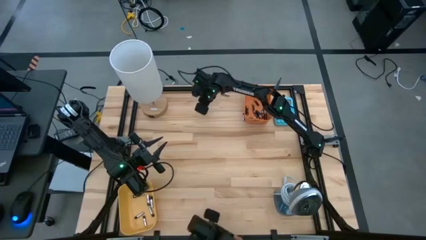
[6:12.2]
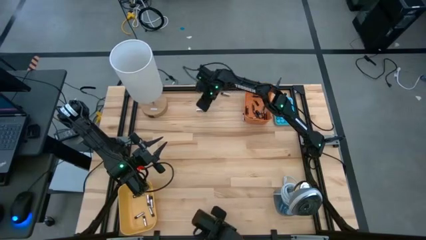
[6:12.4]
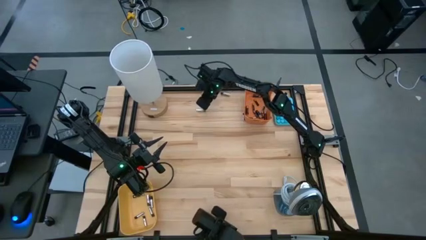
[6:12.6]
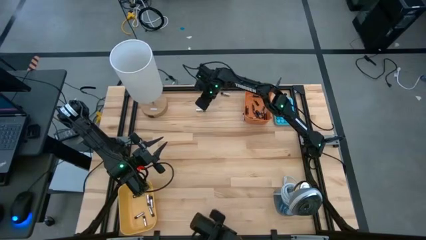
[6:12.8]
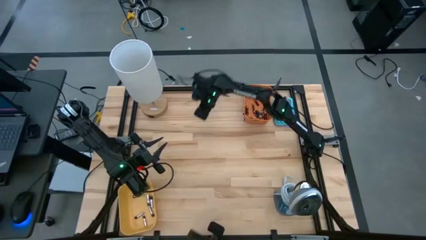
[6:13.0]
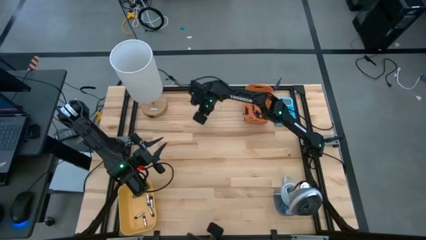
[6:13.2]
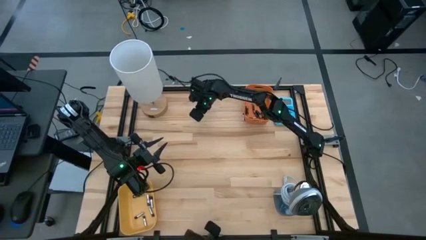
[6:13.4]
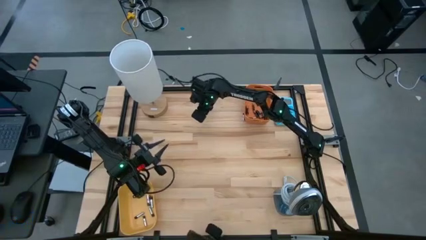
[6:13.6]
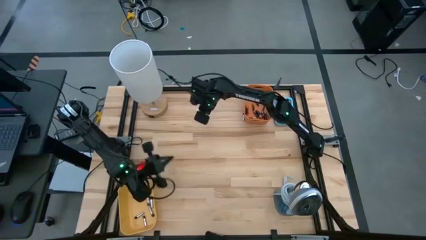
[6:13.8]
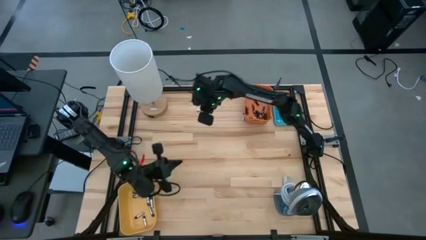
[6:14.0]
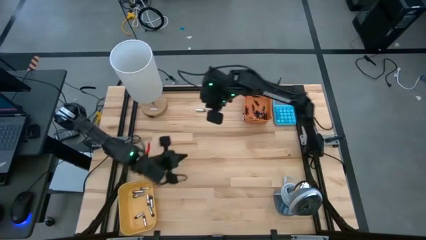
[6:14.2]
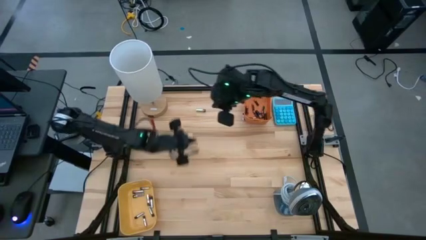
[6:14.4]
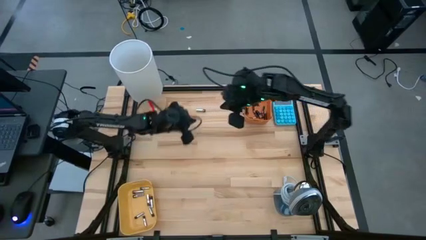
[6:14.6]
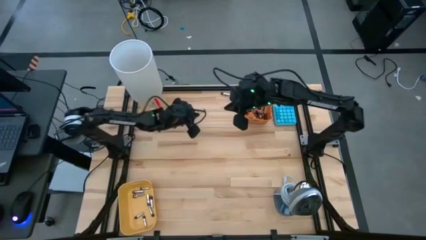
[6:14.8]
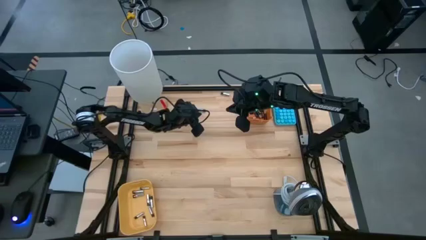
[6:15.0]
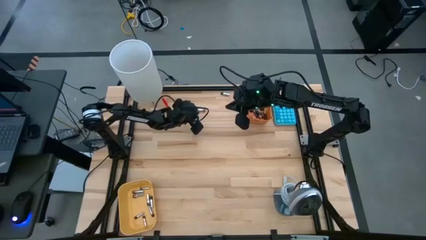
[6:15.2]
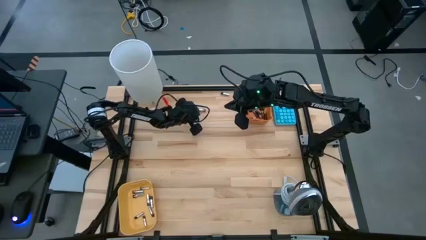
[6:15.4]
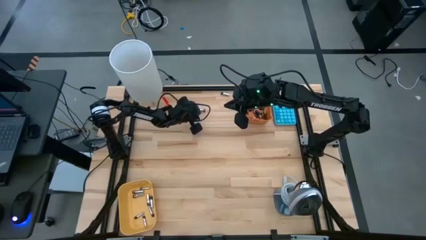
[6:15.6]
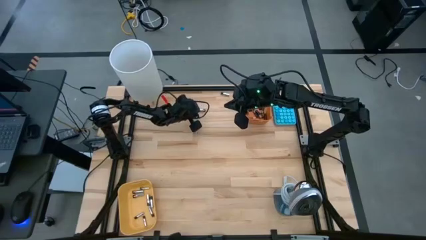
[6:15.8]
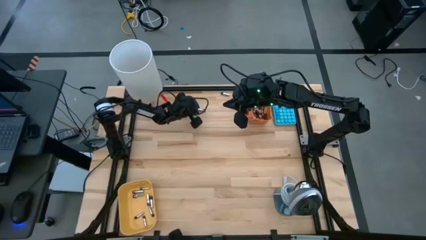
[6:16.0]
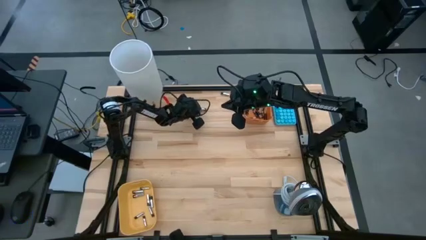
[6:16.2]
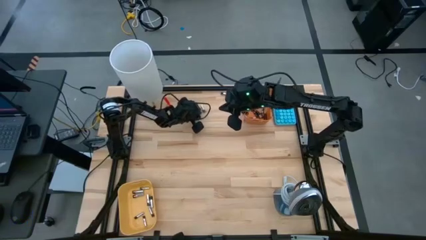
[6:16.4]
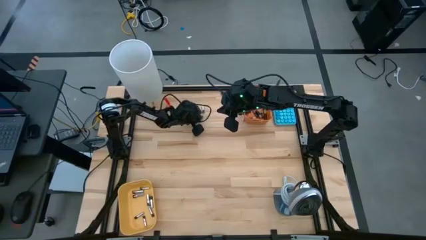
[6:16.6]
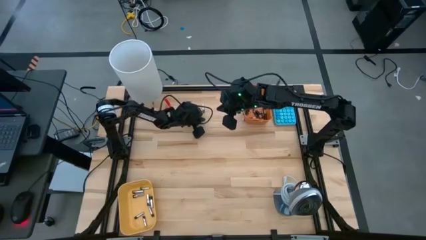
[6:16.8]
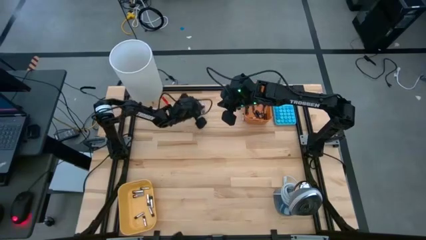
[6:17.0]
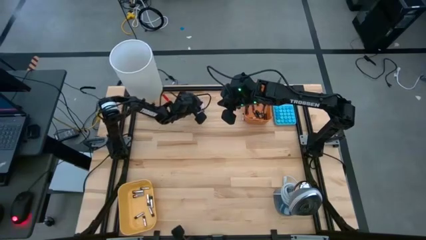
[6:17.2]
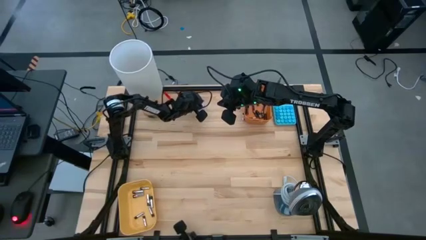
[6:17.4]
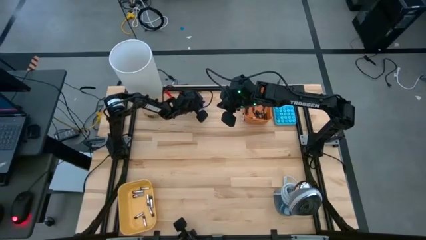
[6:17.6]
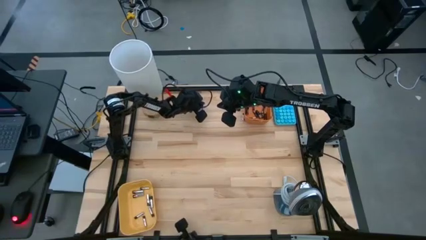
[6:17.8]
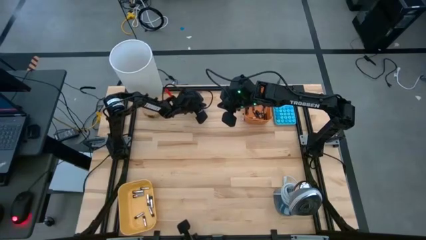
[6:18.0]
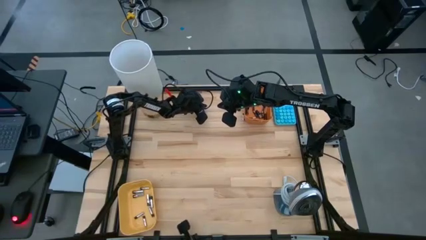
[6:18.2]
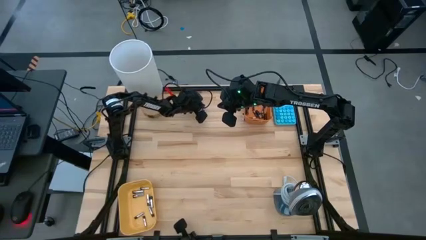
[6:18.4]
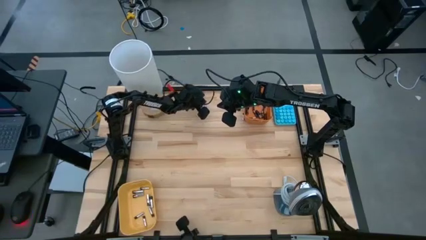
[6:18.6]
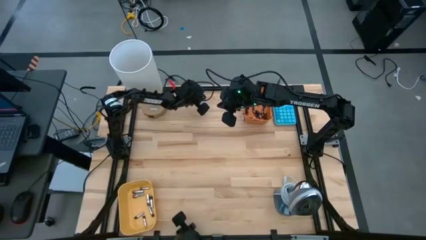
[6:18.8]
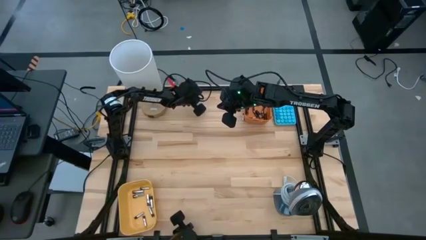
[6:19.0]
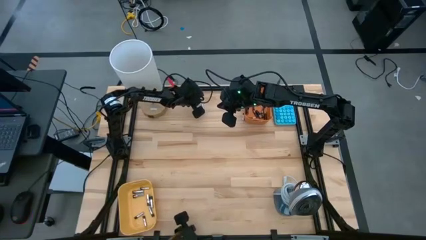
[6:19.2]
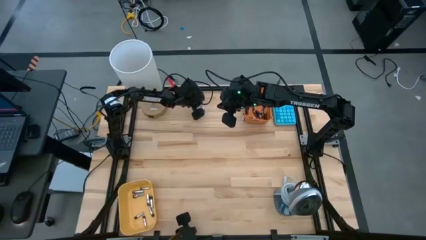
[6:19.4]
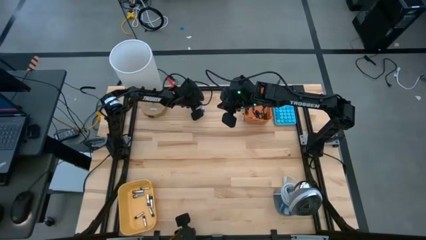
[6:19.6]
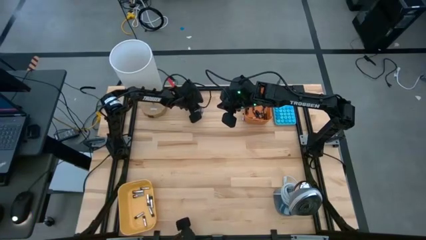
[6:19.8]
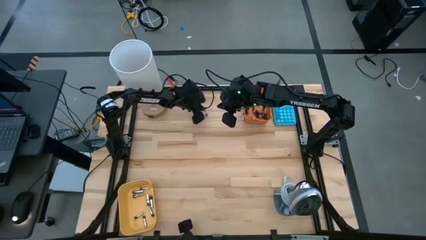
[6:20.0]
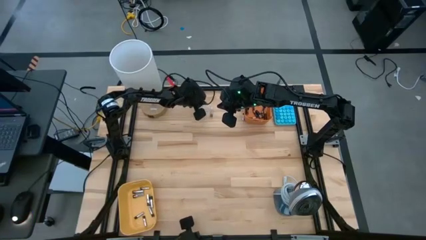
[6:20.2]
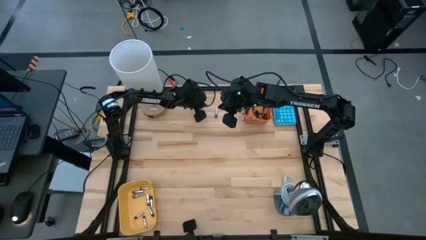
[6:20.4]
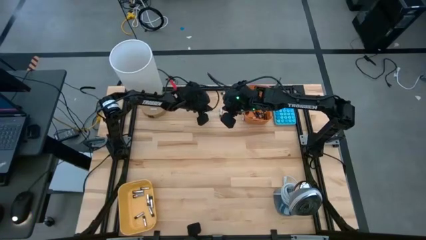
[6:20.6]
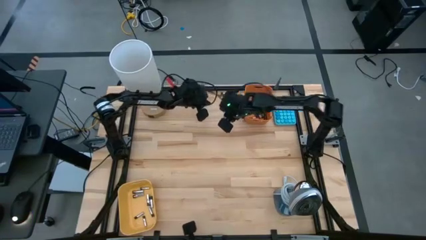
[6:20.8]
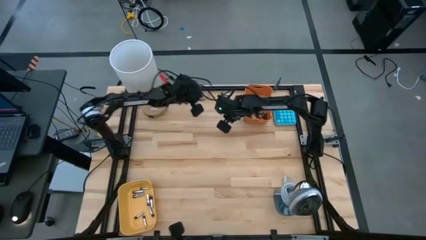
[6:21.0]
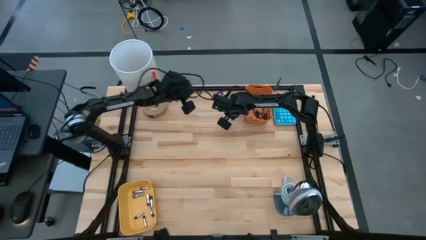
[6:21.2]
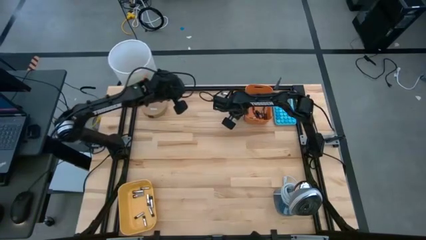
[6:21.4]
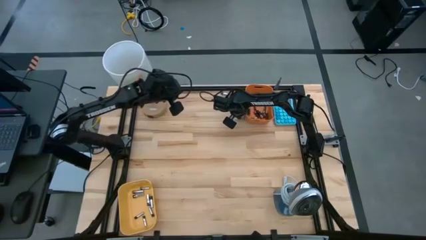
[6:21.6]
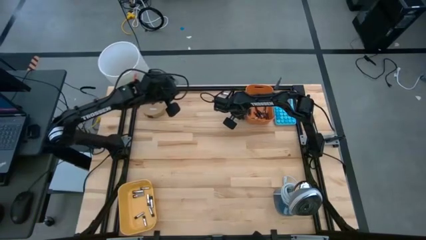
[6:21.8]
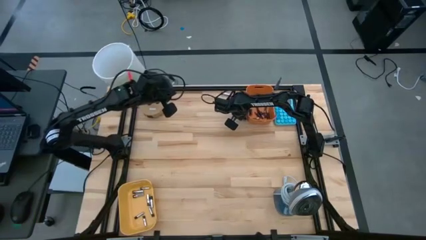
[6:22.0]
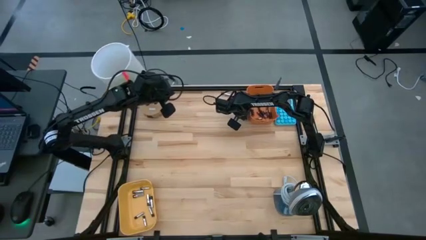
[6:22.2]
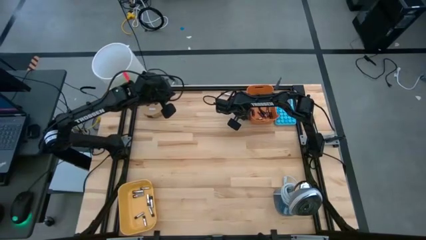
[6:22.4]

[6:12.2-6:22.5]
Task: Sort batteries
Put the silver battery into the yellow bin
